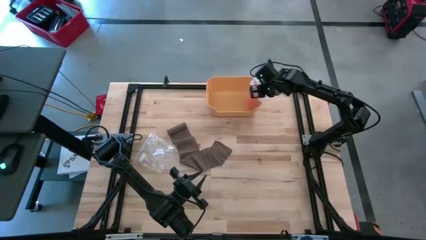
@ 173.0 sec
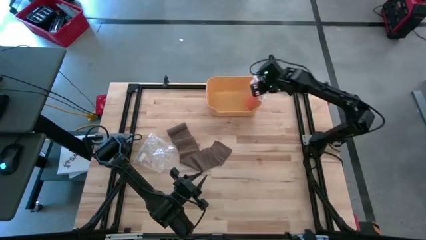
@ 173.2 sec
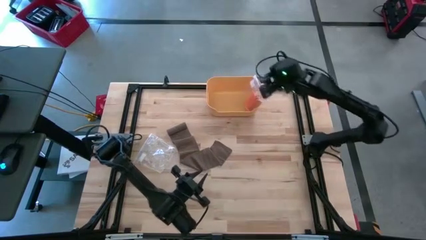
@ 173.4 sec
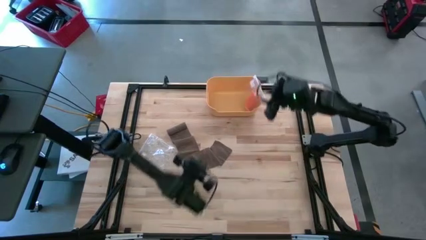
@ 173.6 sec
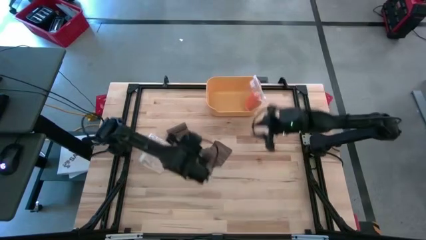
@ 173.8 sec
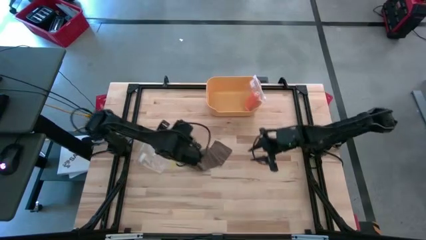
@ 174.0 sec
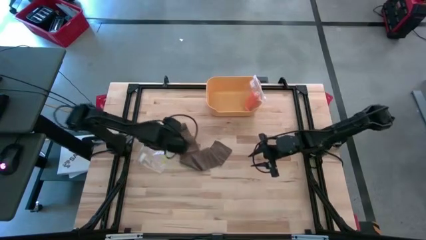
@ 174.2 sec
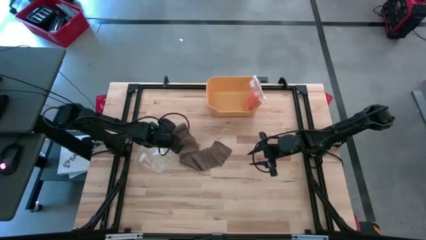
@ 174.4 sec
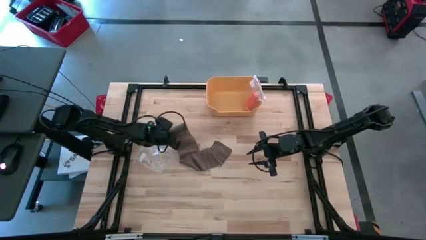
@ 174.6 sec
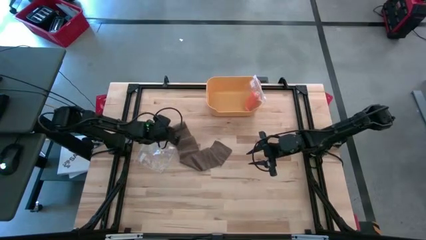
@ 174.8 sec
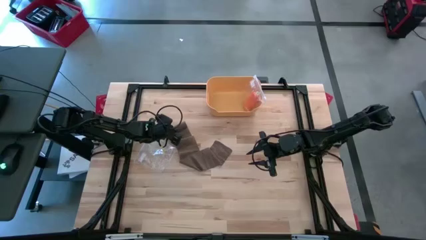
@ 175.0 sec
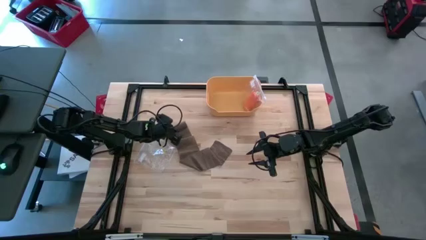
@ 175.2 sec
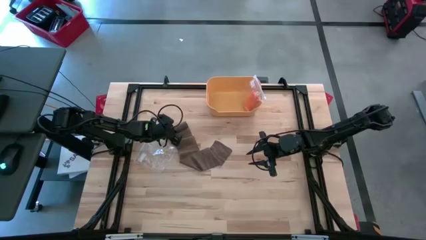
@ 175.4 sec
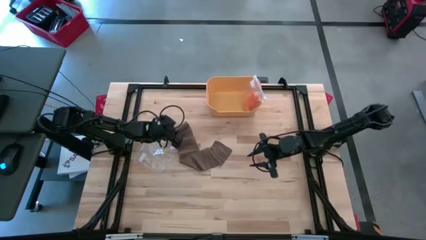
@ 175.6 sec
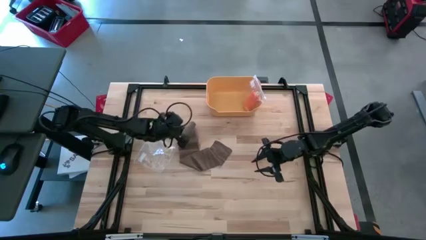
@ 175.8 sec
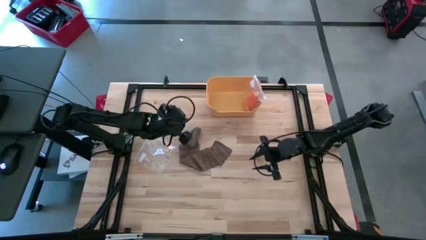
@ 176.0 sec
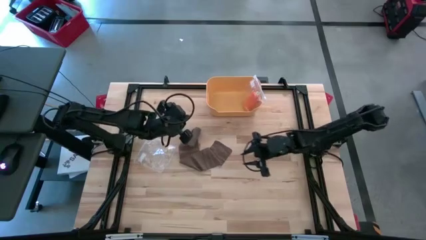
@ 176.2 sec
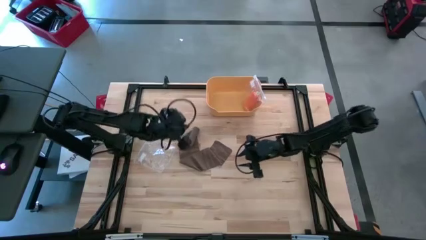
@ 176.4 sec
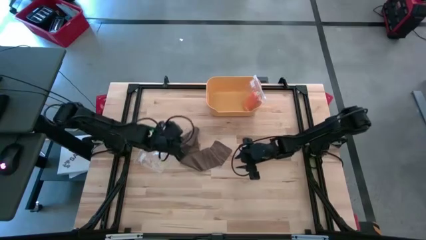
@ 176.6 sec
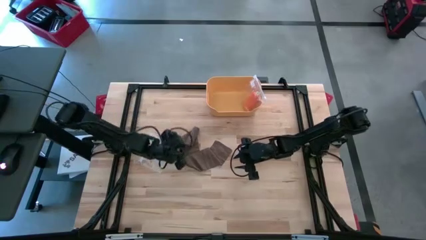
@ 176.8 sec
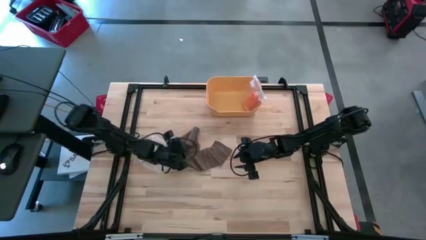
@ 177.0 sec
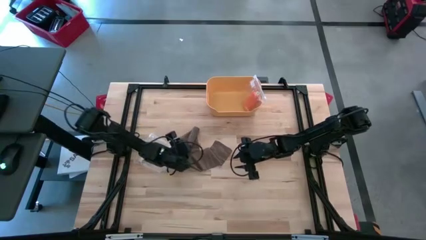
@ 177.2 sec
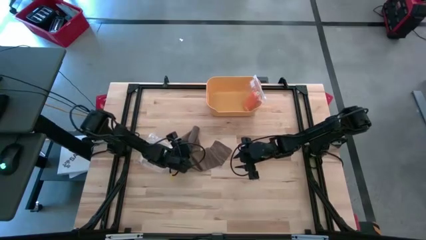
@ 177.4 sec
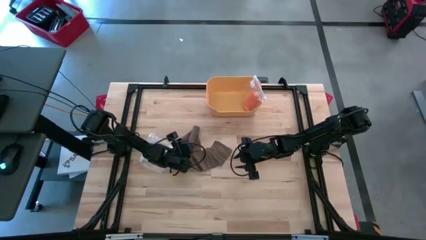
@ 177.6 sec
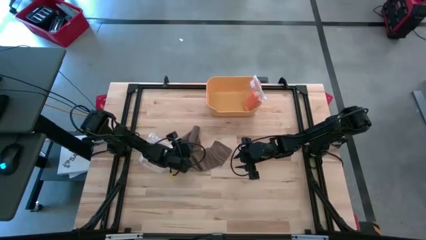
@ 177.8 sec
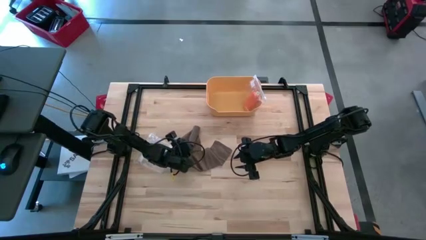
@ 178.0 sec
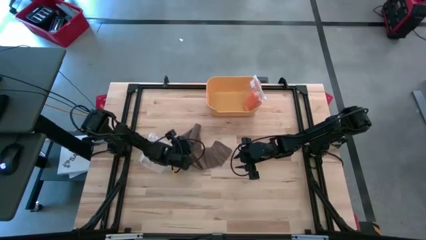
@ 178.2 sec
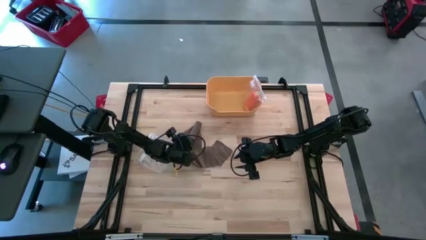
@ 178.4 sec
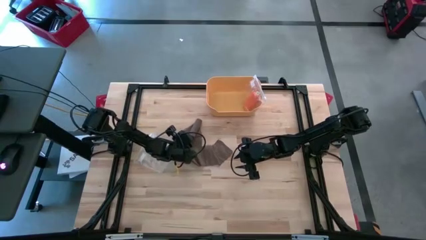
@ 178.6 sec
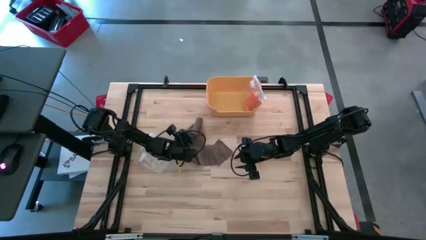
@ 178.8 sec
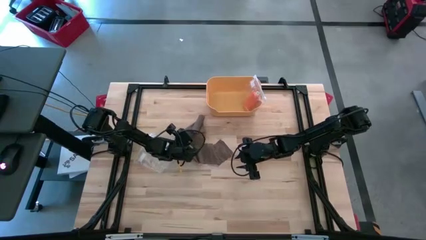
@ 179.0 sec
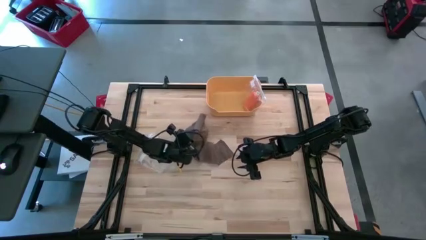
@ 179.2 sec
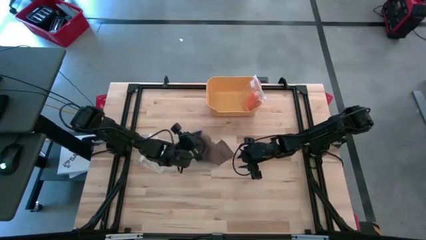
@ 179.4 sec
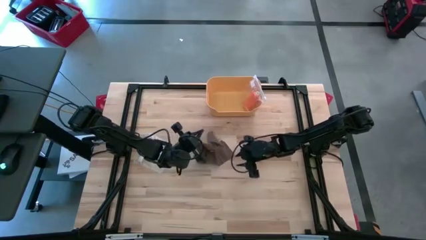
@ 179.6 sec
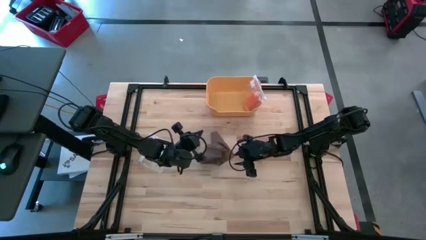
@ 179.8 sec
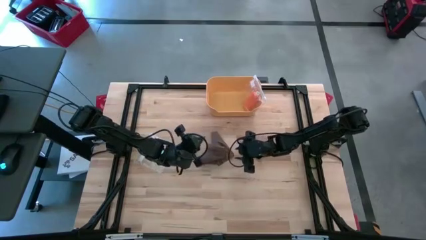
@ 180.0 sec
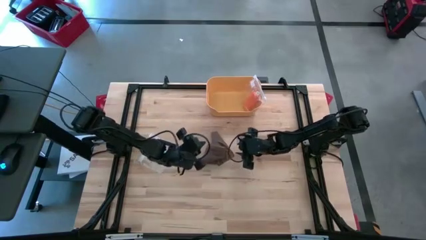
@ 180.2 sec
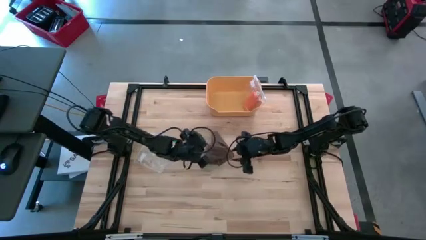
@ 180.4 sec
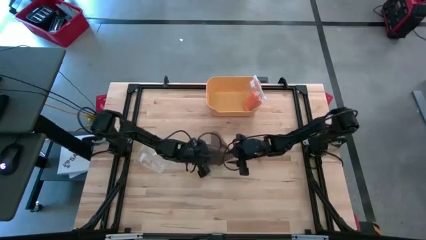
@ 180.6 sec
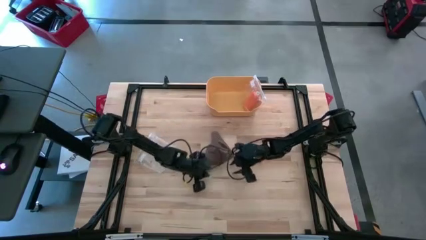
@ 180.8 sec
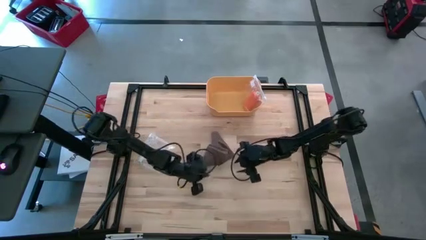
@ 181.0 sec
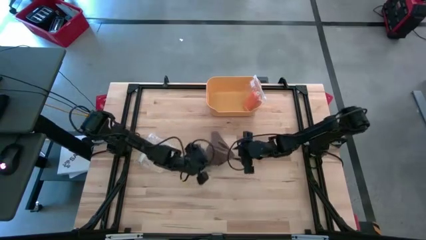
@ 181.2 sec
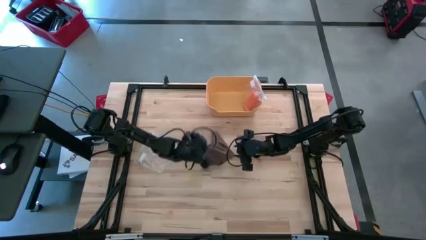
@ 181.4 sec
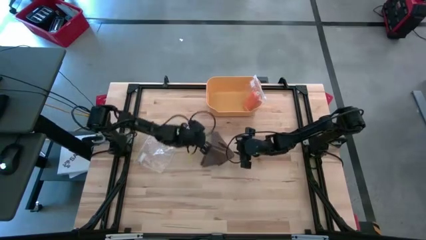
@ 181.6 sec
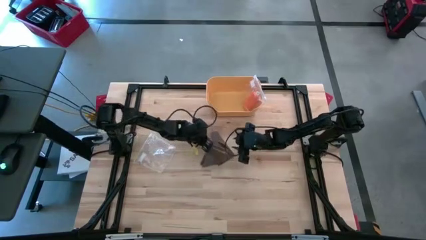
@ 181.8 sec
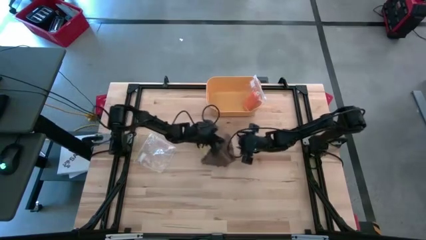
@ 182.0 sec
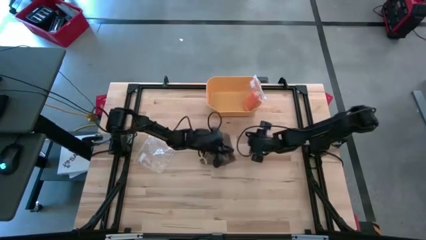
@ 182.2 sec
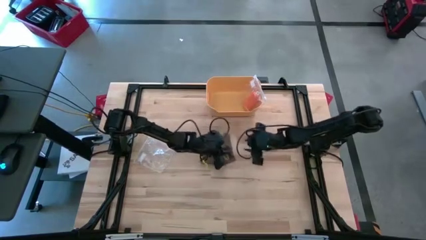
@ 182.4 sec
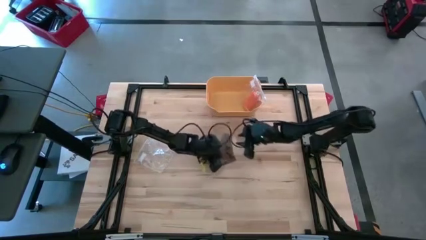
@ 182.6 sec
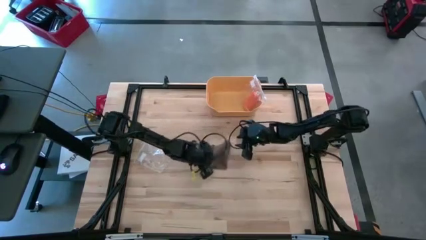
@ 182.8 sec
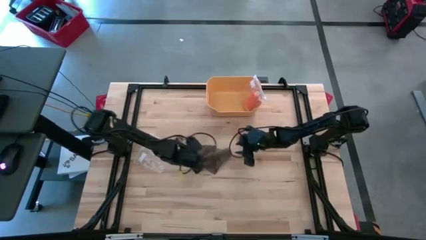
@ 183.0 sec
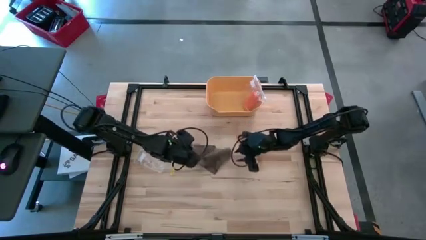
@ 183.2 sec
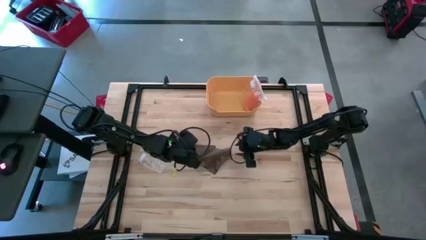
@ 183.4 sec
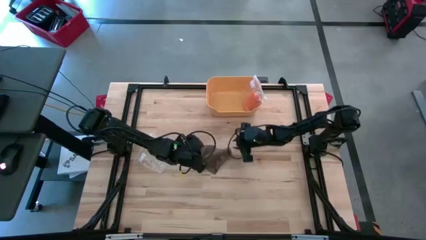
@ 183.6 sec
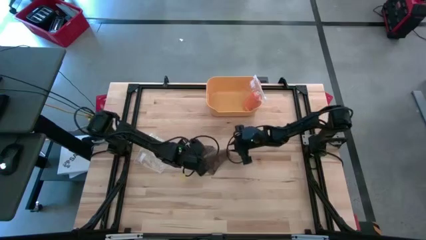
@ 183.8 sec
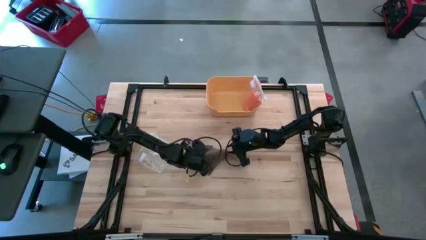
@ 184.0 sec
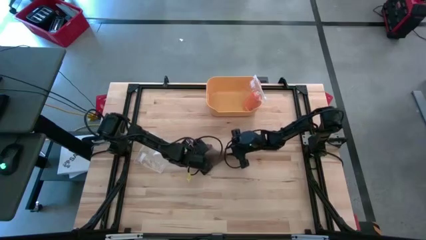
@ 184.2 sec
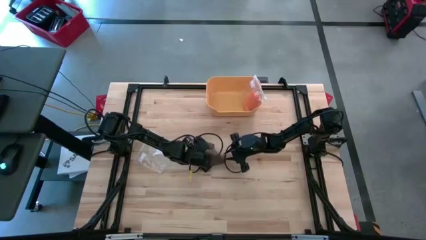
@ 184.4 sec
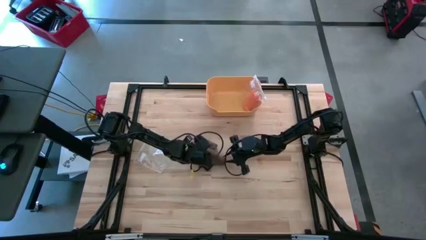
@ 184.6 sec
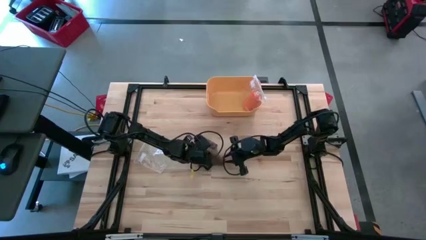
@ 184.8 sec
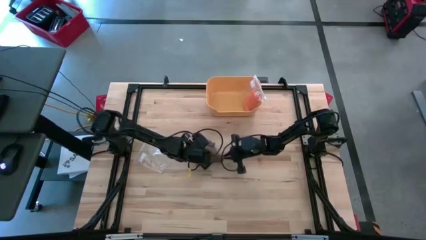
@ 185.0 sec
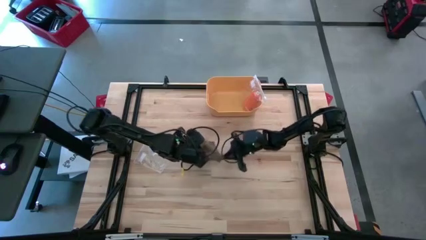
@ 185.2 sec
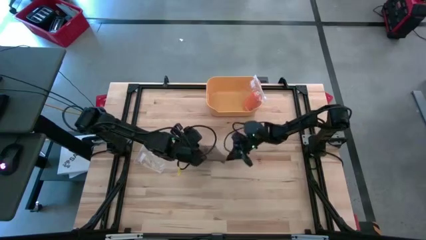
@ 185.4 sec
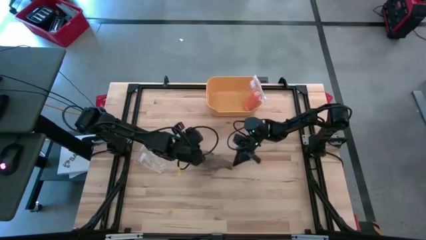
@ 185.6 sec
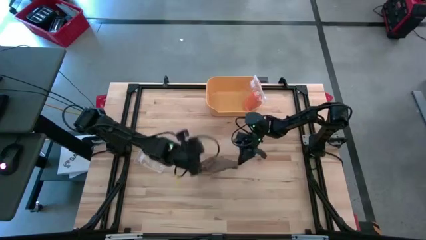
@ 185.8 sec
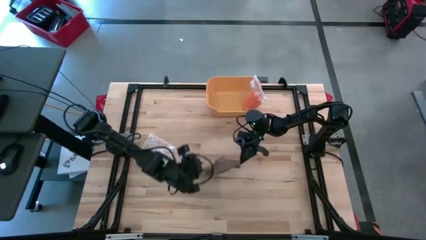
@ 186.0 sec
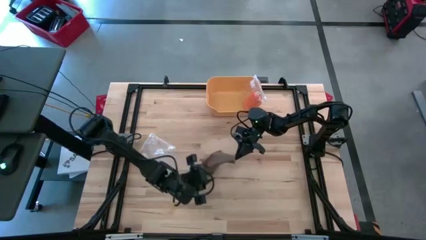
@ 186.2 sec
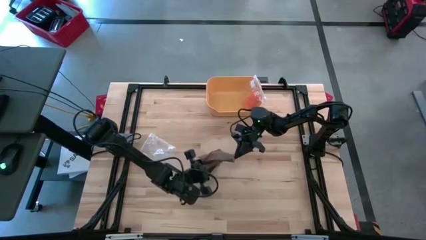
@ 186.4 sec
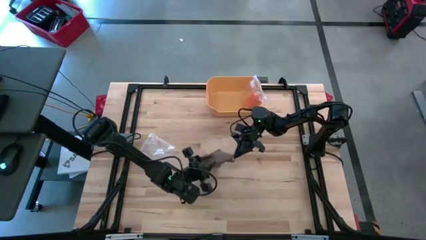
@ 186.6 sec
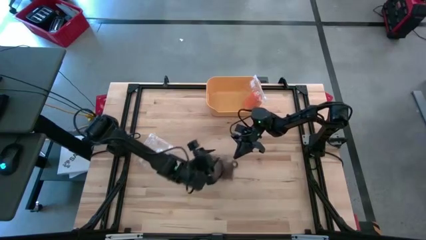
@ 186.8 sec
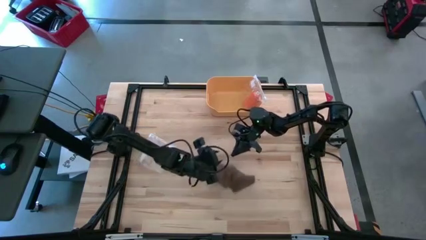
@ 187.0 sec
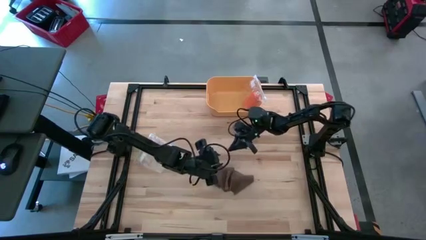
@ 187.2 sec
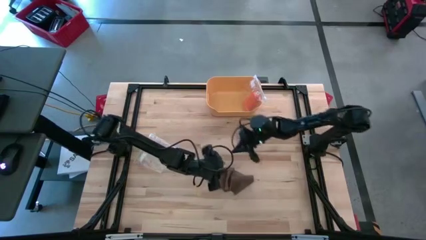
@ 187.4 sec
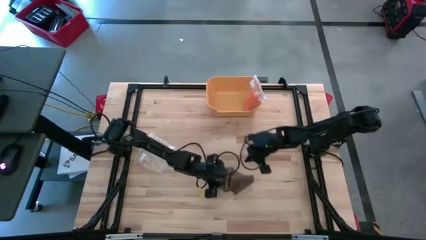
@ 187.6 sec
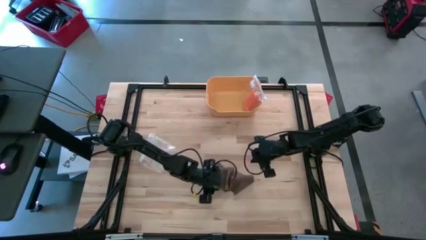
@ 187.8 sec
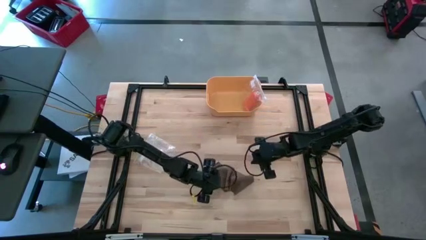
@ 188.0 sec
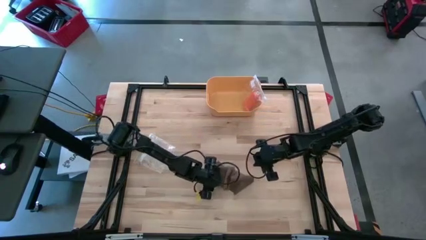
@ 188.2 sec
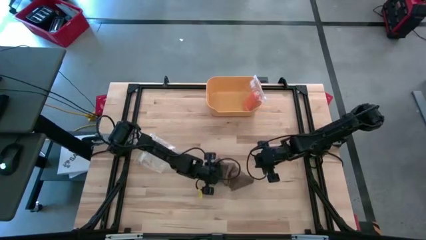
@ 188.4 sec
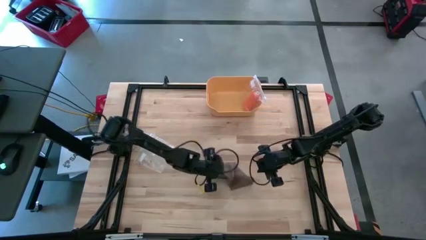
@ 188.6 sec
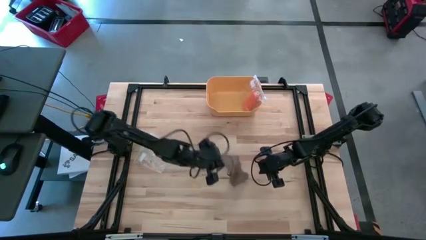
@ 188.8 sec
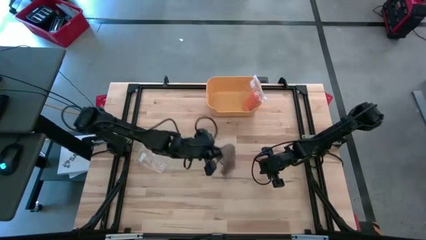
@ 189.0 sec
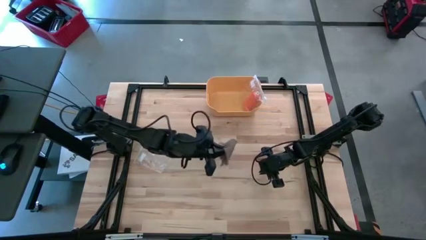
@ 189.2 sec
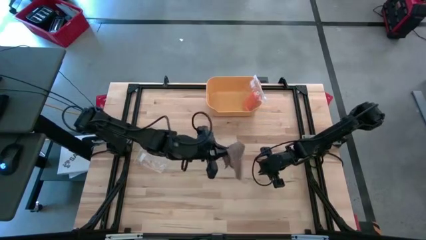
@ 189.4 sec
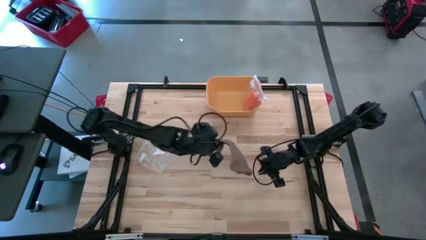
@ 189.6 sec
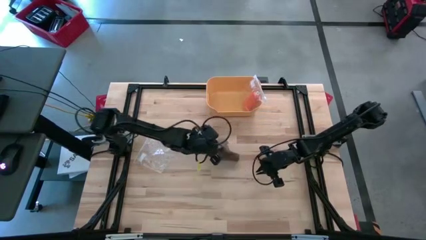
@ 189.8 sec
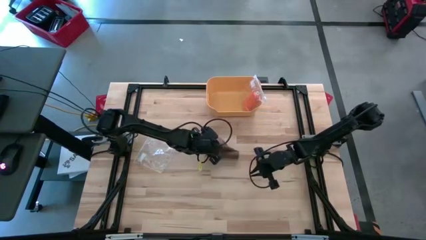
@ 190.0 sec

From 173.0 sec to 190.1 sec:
Task: Roll bandage
Roll the brown bandage
